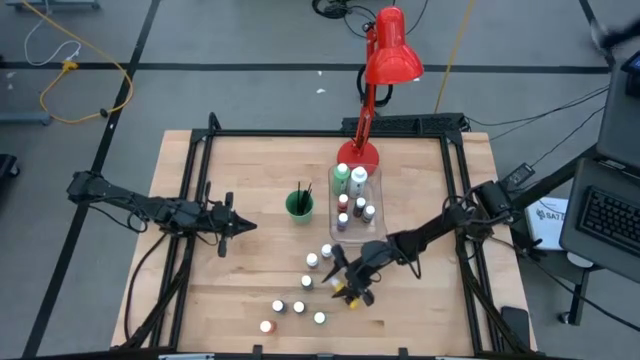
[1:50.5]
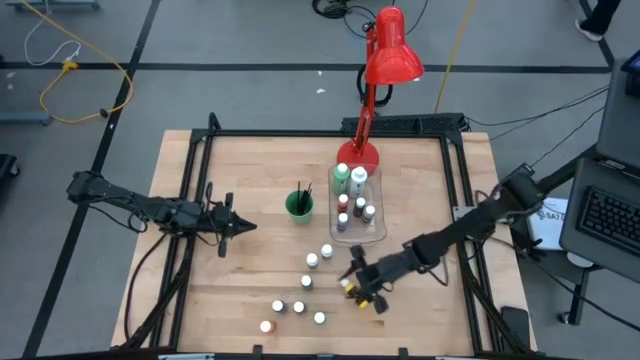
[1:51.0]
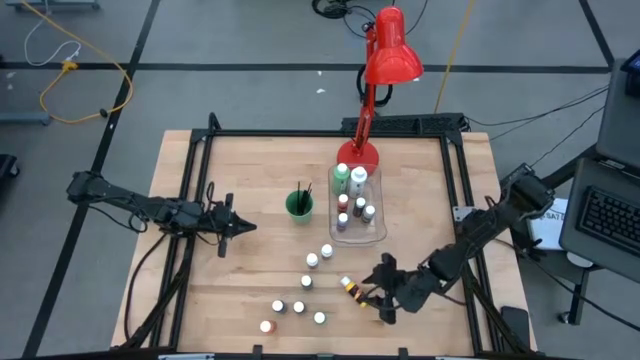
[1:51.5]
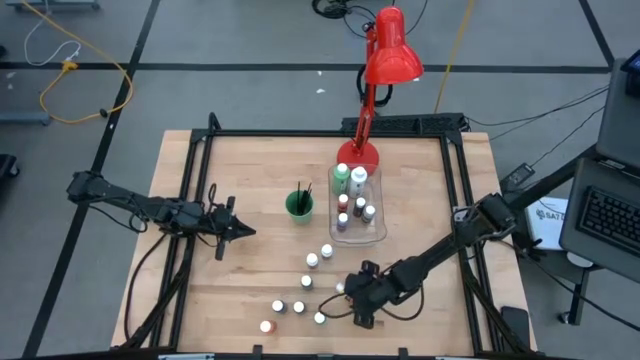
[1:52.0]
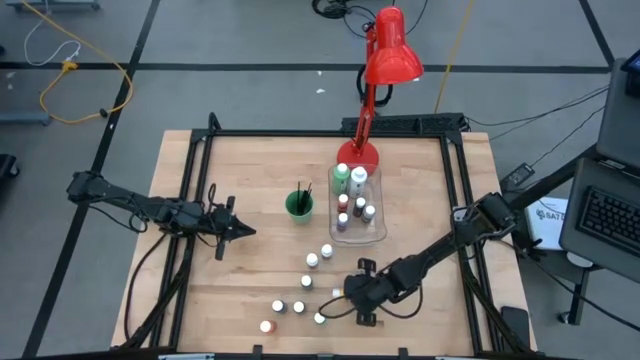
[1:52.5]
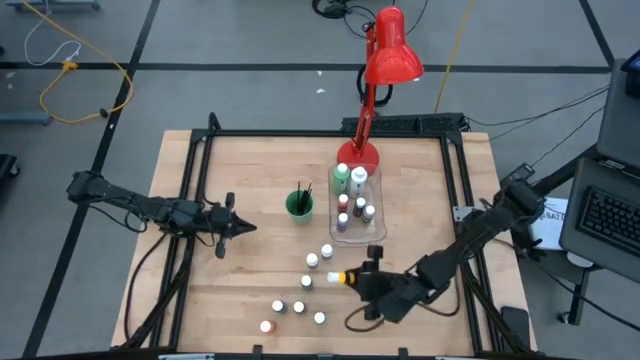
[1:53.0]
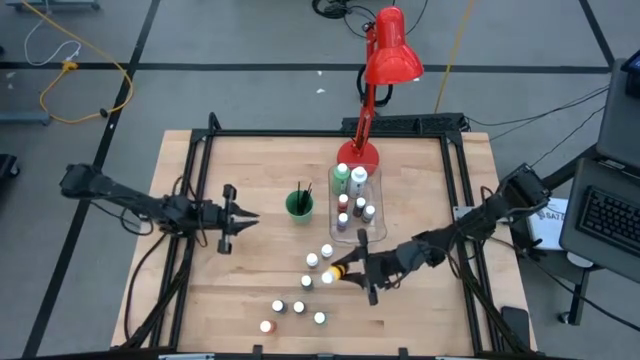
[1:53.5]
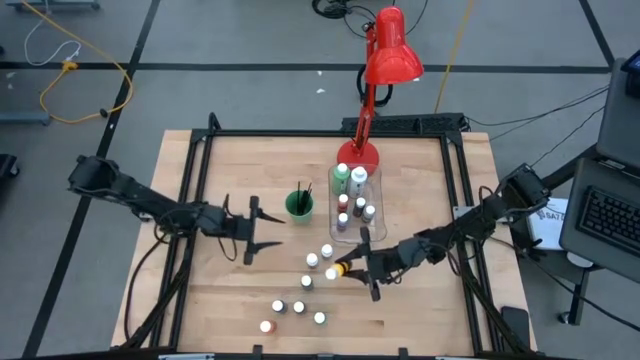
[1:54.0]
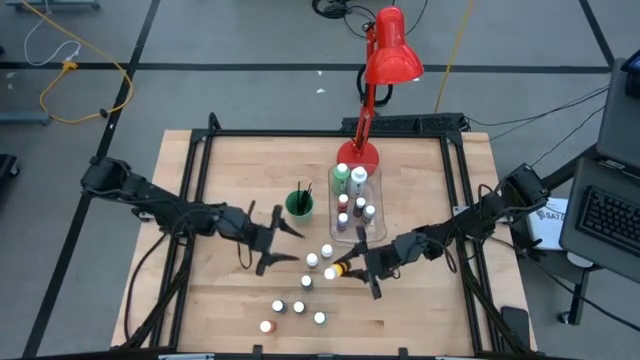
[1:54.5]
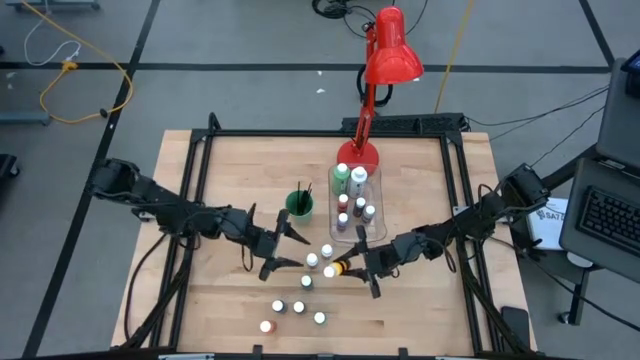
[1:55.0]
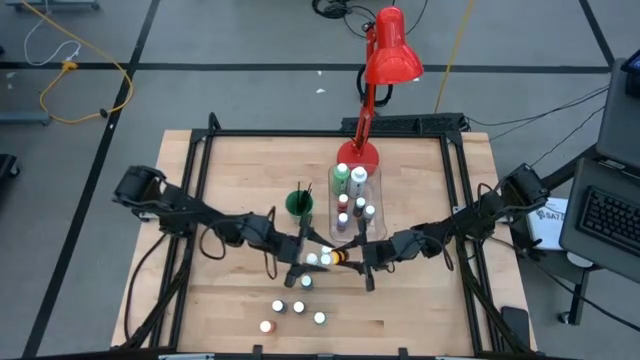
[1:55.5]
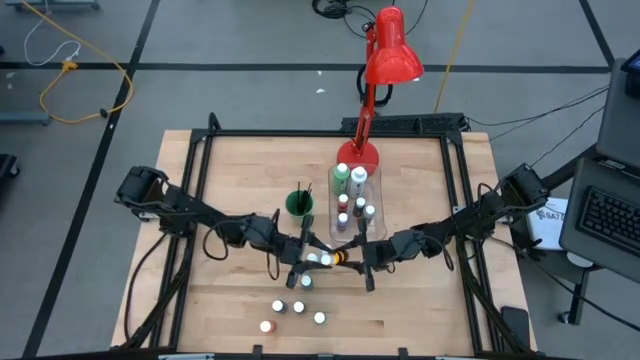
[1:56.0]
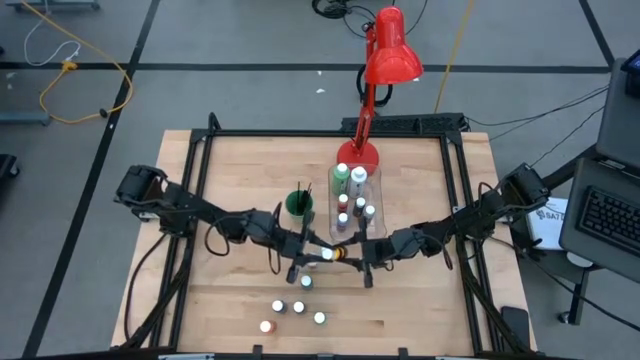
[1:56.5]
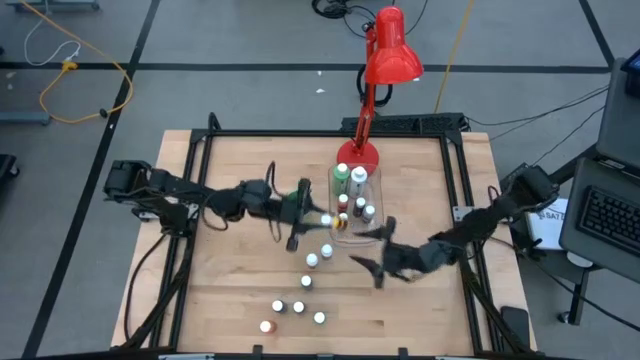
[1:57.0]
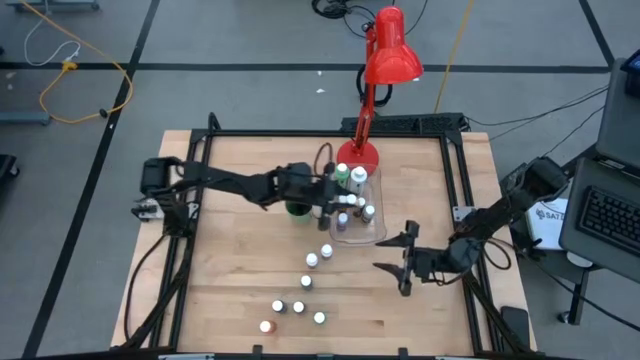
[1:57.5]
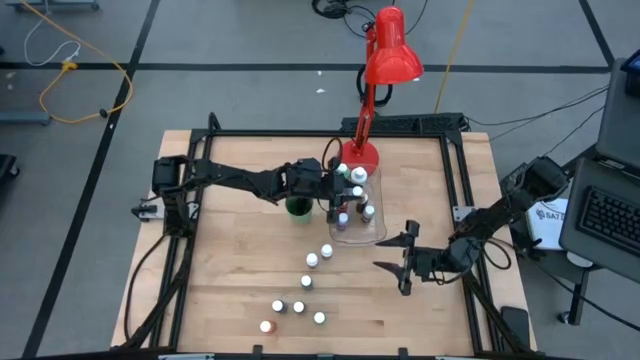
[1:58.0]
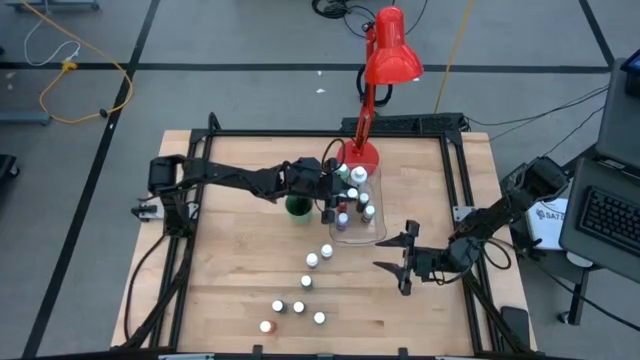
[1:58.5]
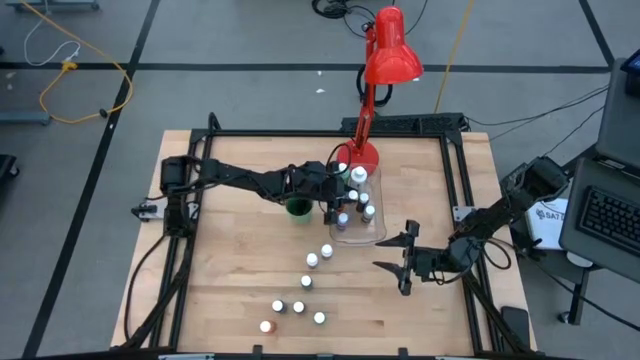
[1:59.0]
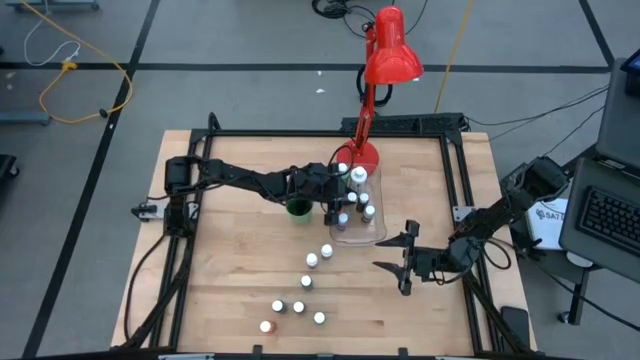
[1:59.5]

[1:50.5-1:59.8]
Task: Pick & Place Paint Supplies
Put the yellow paint bottle into the transparent bin

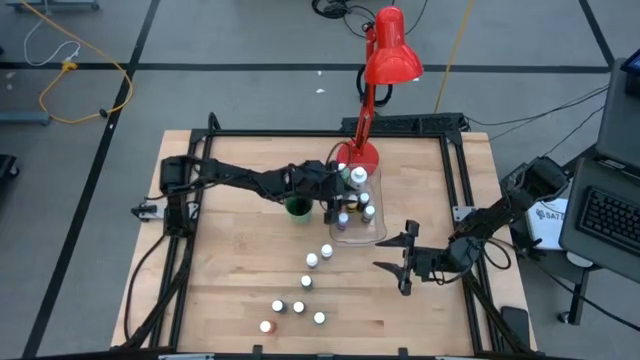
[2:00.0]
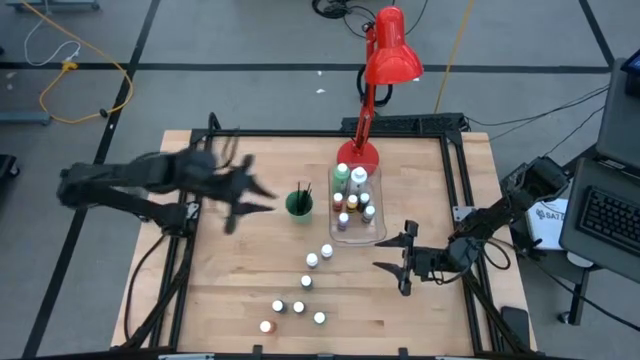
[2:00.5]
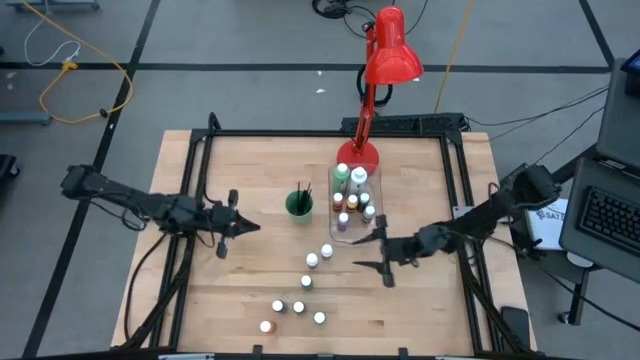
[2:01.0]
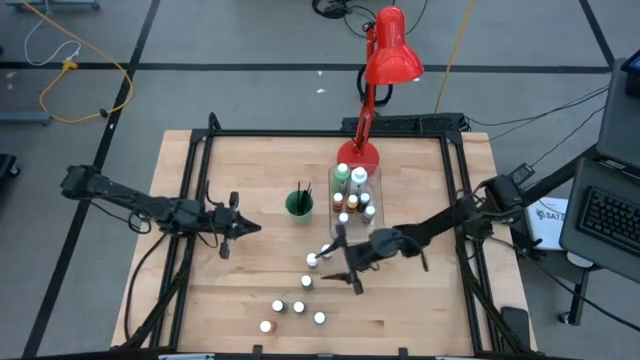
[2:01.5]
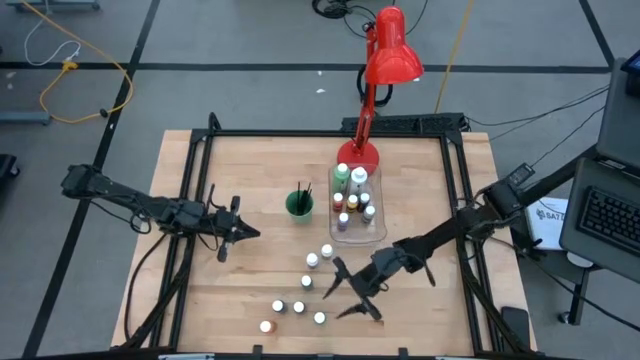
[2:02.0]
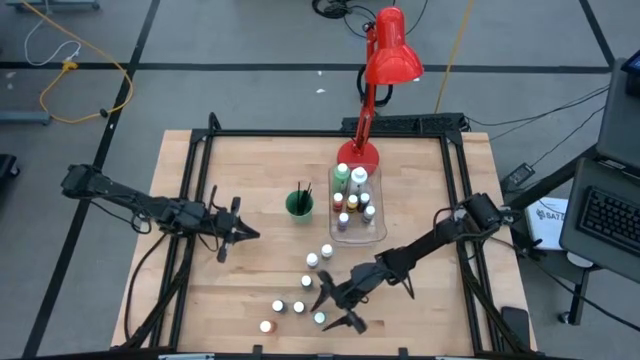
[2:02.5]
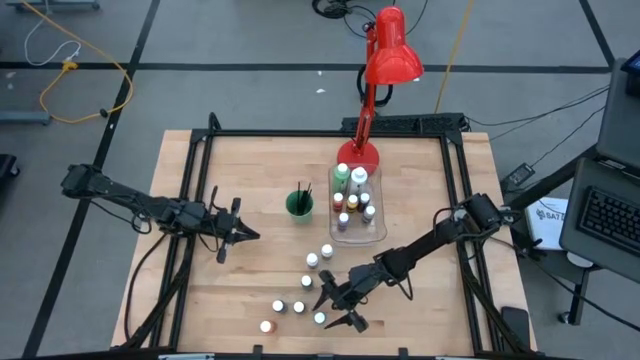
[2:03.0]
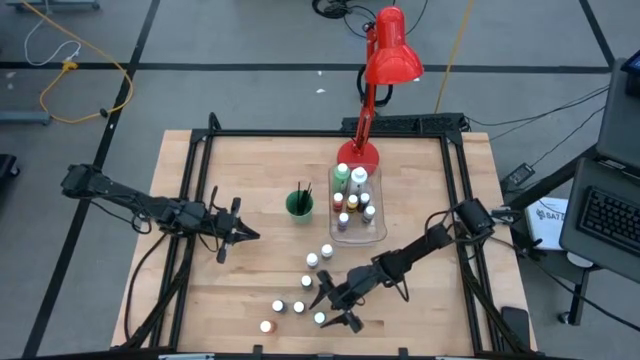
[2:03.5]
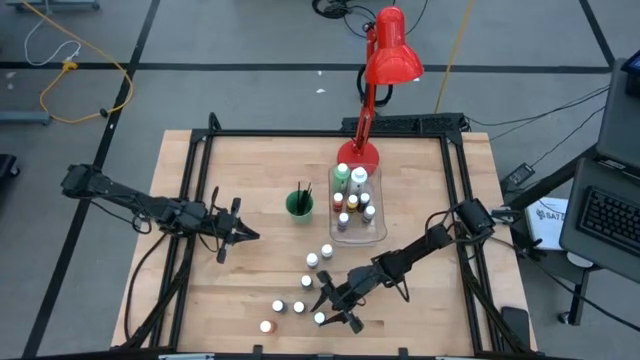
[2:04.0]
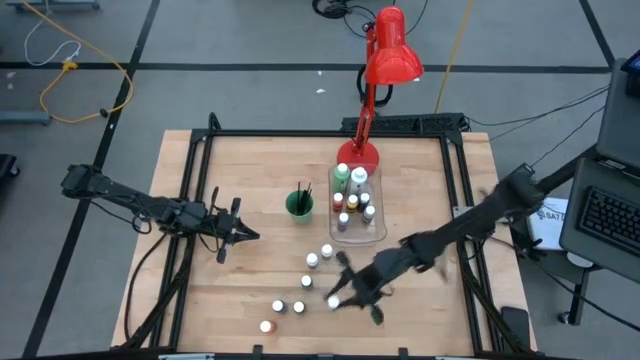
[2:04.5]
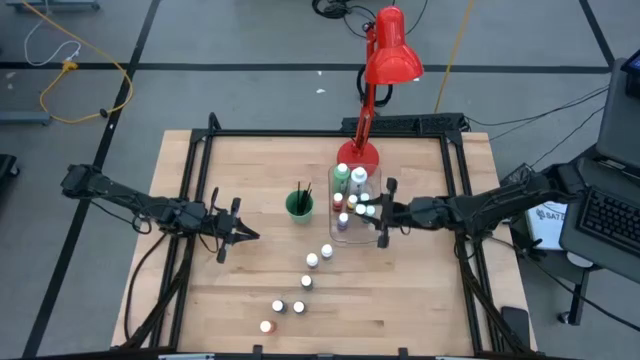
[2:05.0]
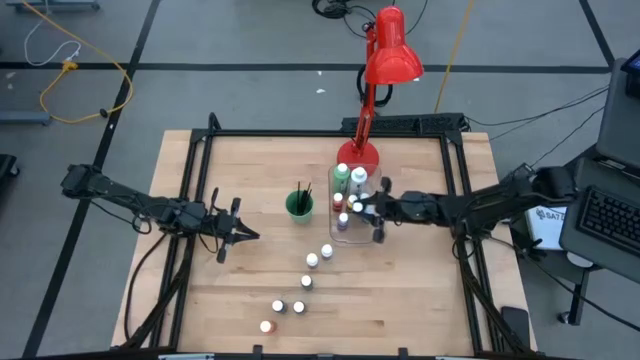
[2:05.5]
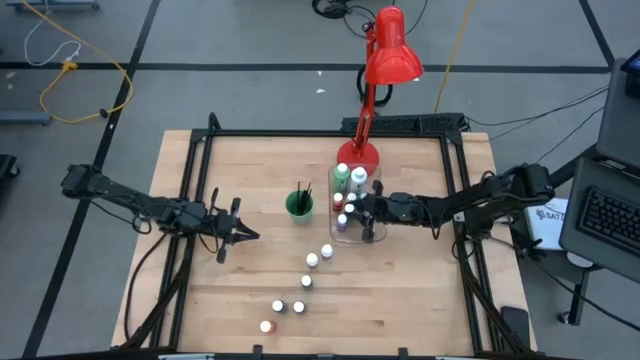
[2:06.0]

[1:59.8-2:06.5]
Put the bottom small green paint bottle into the transparent bin

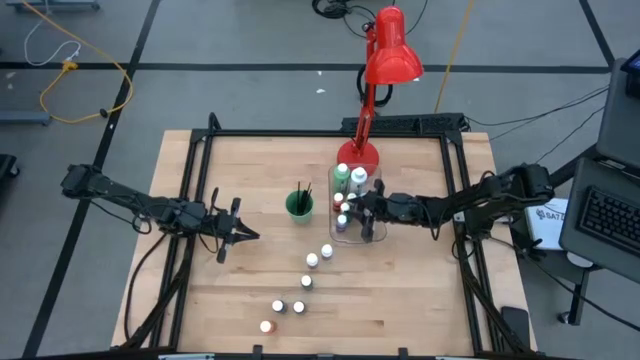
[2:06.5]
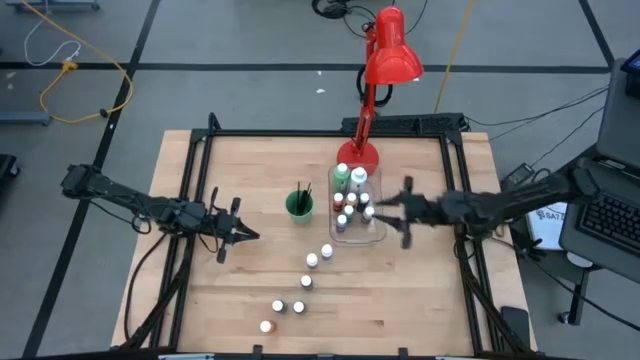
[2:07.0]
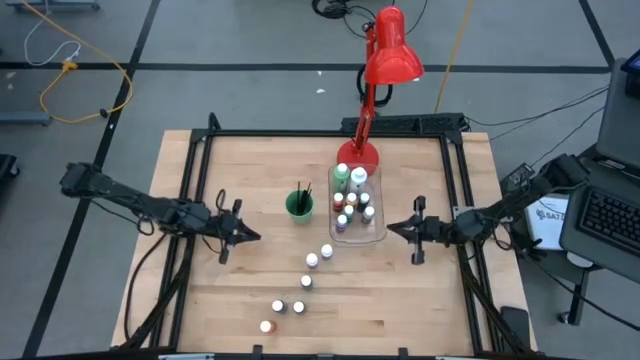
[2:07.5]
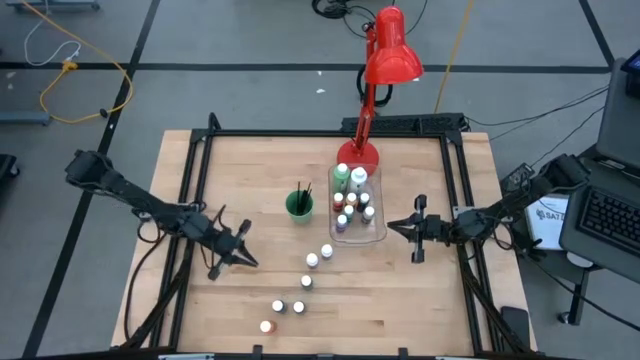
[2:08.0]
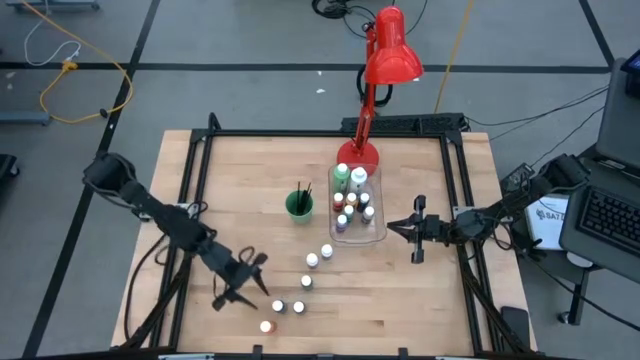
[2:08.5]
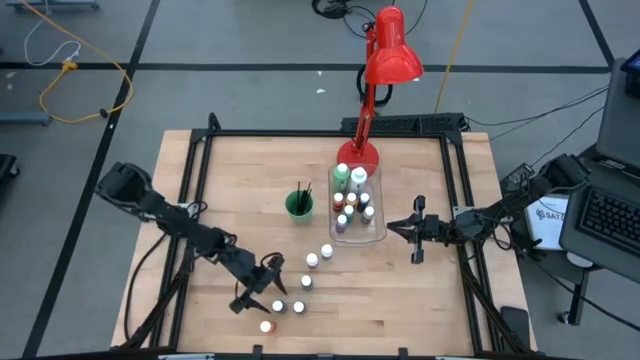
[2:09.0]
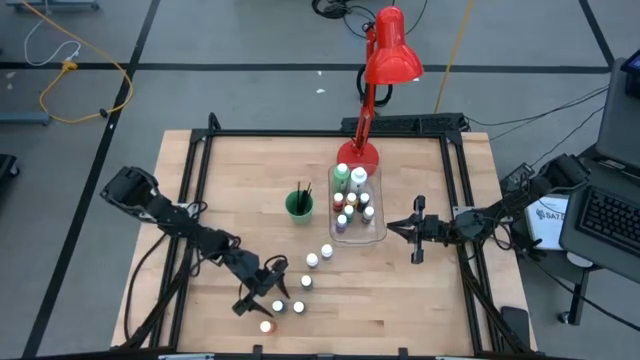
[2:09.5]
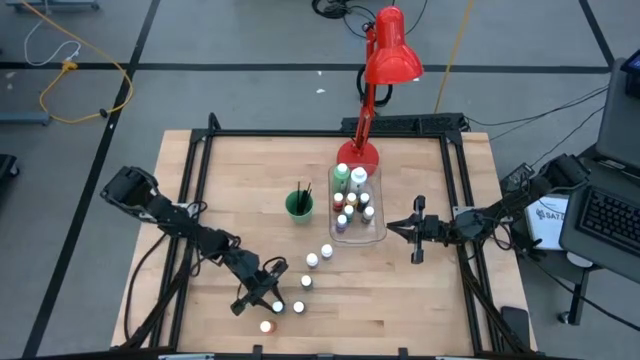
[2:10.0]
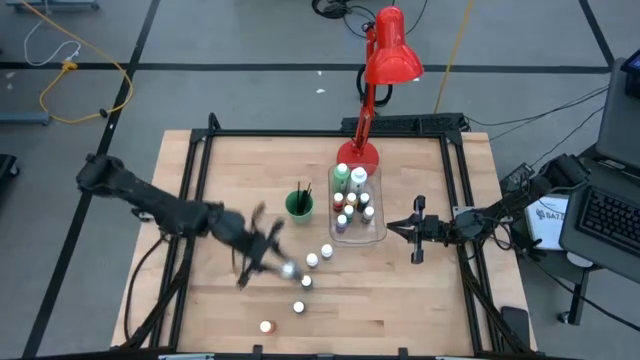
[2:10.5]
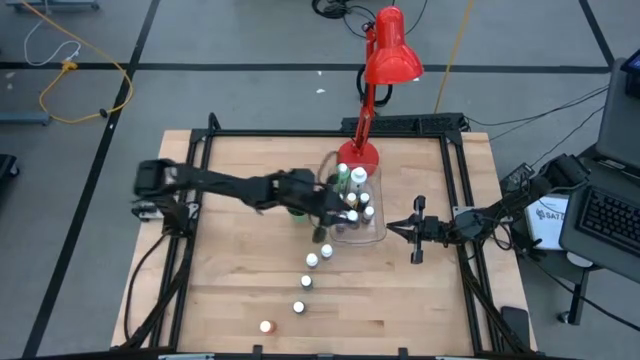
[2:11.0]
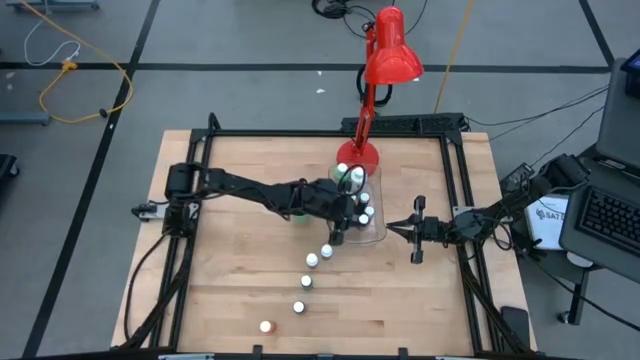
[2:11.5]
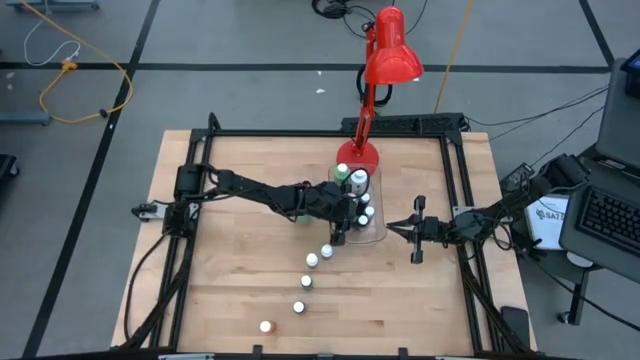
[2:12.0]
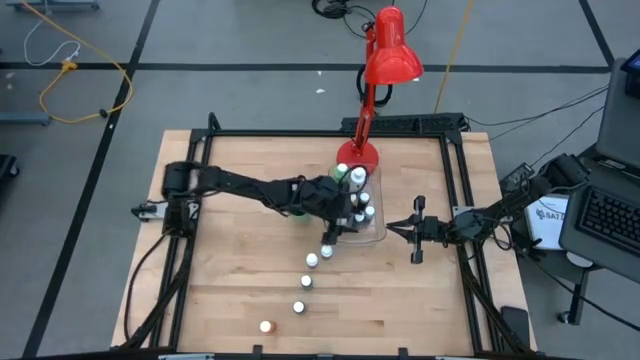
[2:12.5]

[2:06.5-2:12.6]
Put the blue paint bottle into the transparent bin
